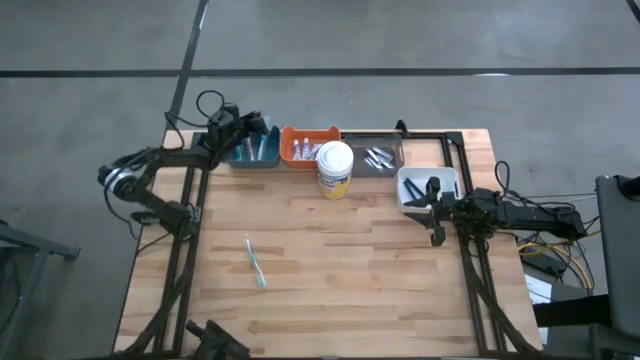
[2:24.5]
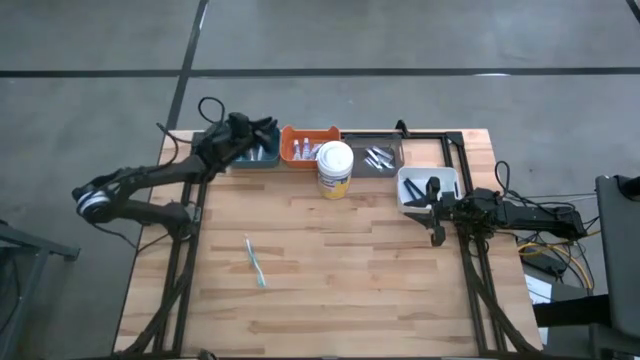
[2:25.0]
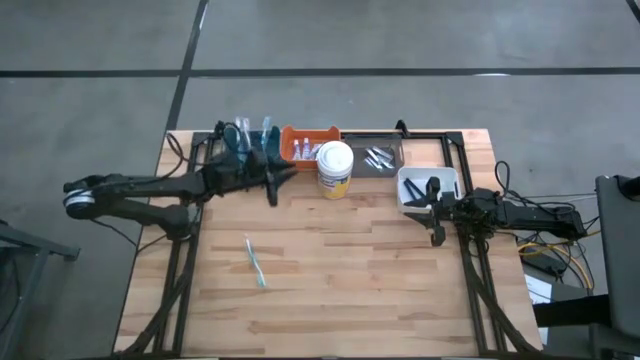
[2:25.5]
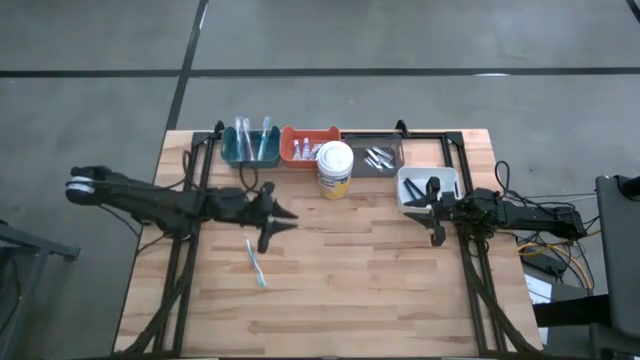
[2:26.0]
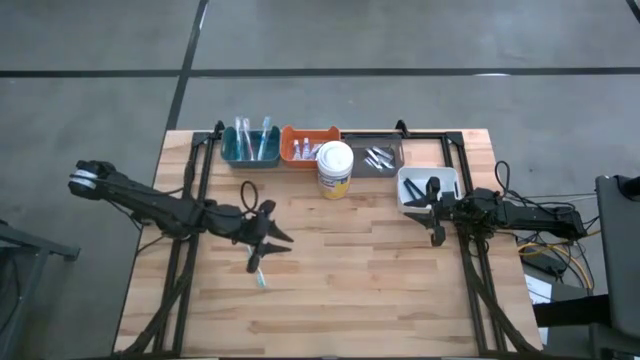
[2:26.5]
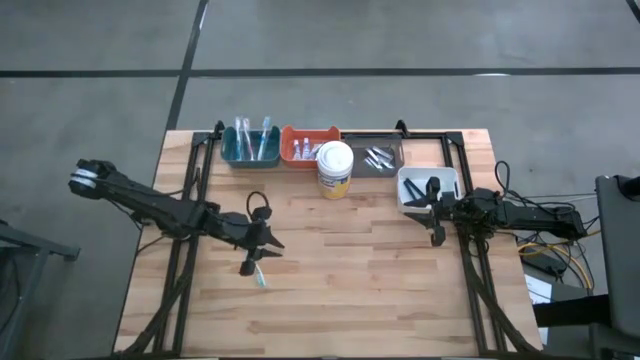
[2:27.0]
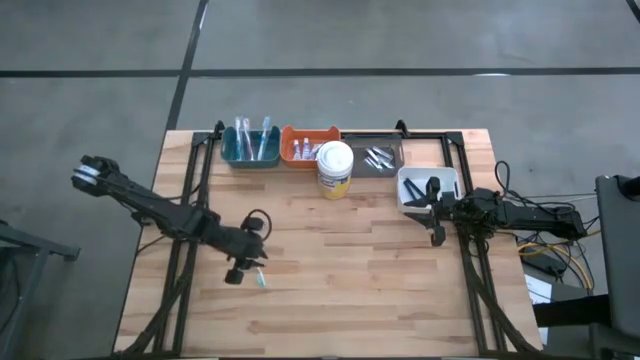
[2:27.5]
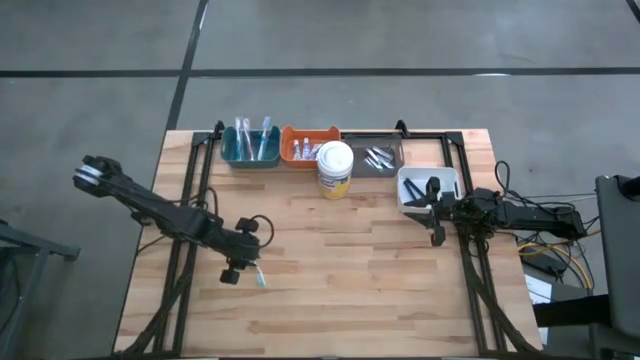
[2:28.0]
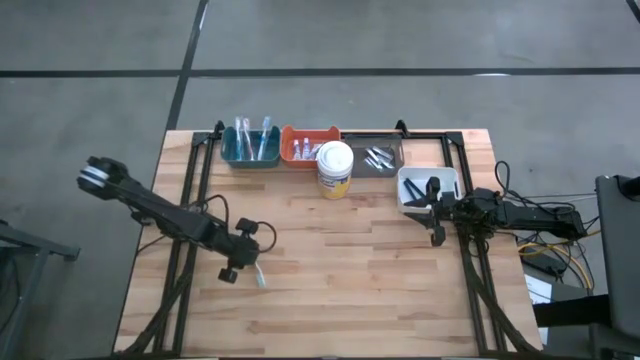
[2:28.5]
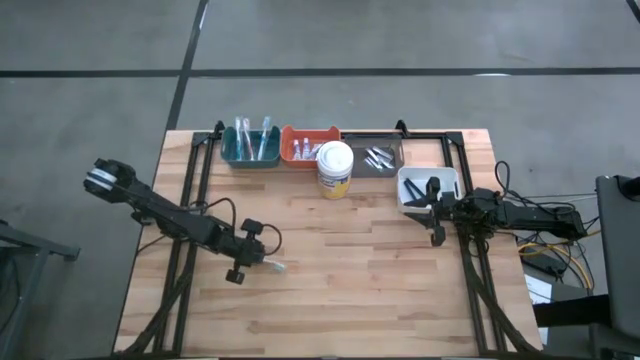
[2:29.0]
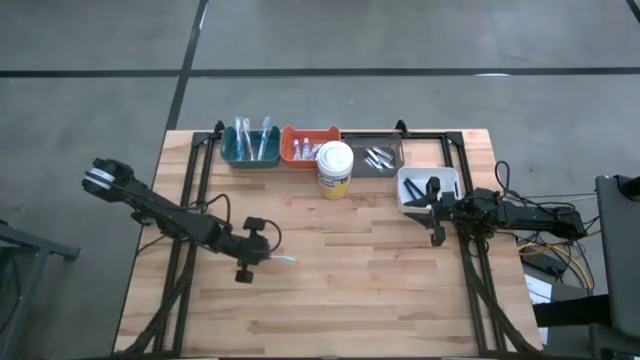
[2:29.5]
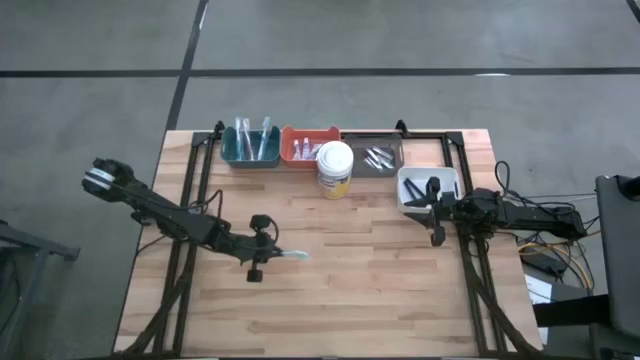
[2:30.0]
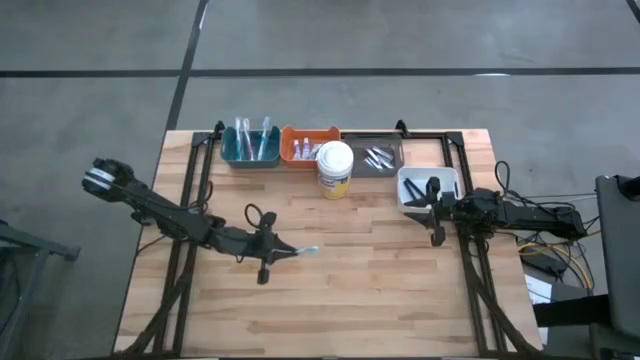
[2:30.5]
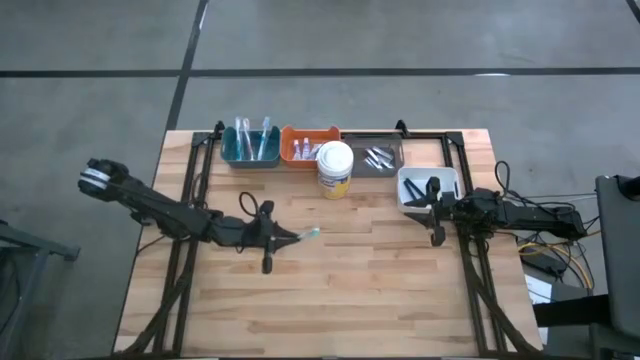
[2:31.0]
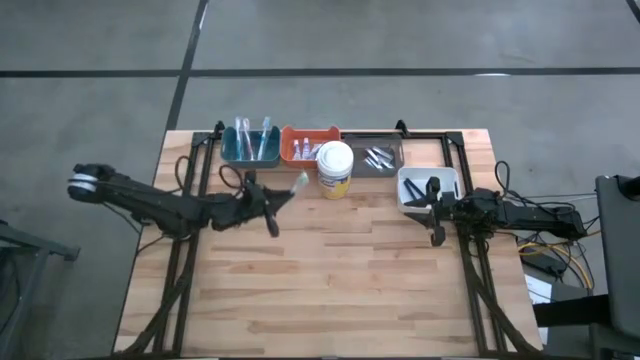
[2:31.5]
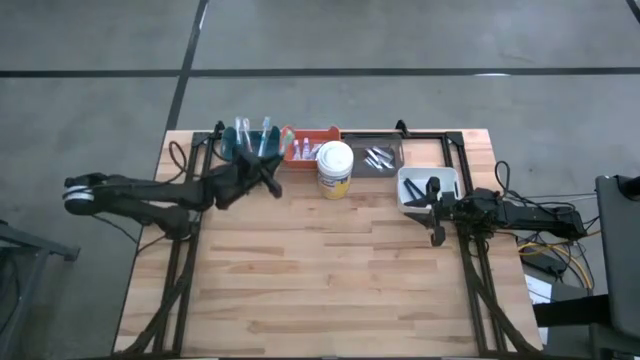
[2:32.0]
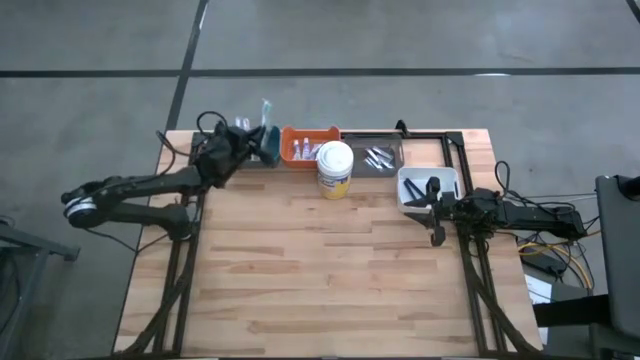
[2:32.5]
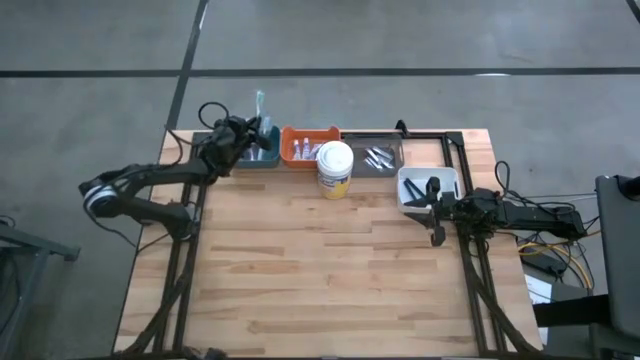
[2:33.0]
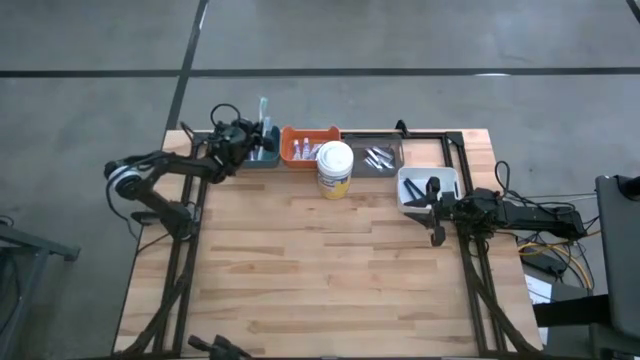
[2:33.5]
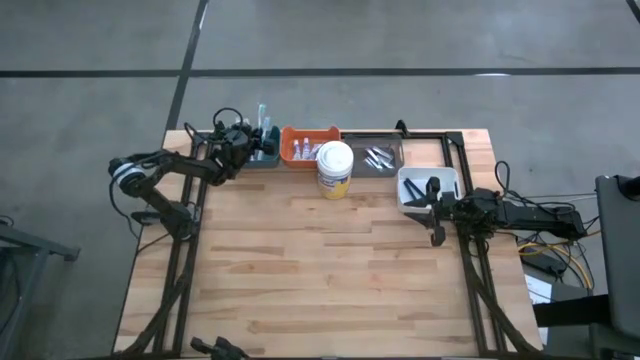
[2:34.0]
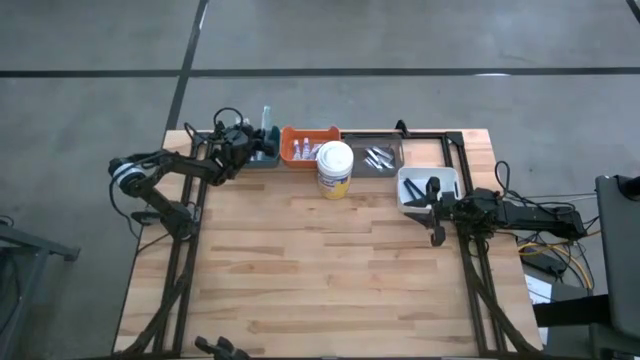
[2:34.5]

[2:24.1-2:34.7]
Task: Pick & Place Travel size toiletries
Put the green toothbrush into the blue bin

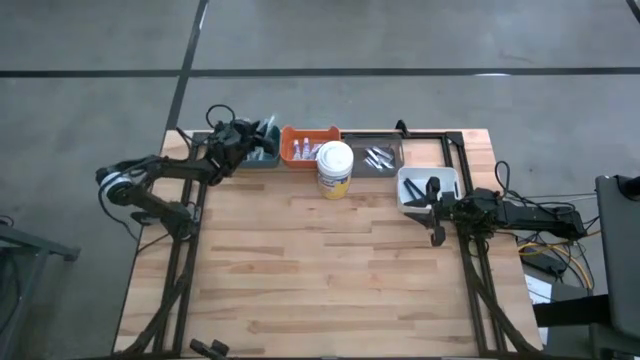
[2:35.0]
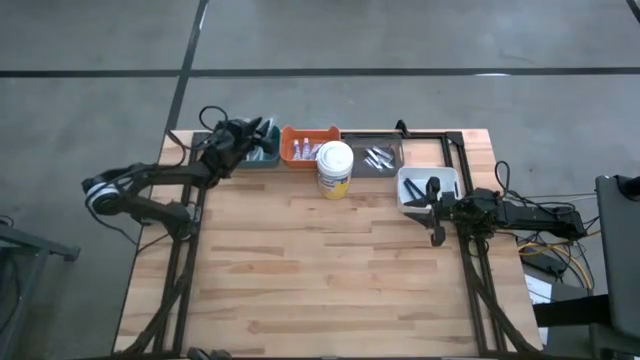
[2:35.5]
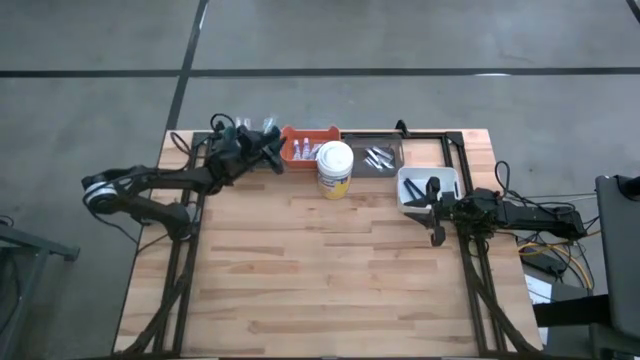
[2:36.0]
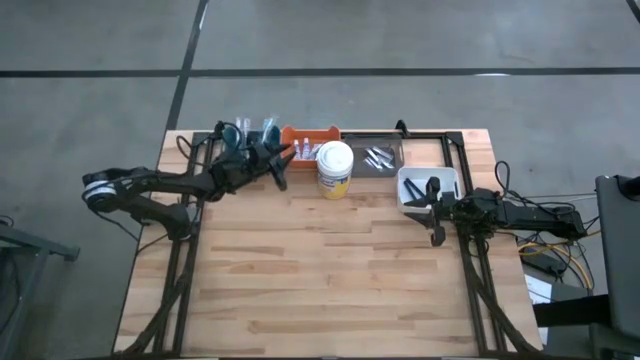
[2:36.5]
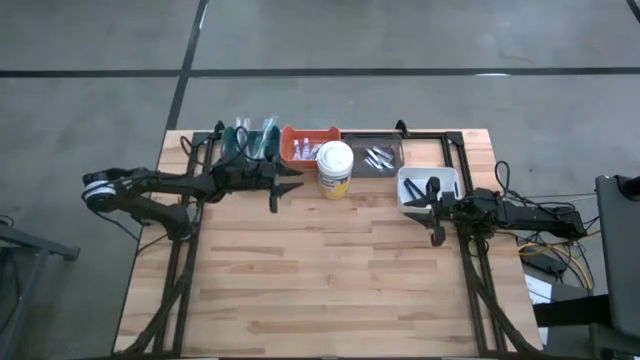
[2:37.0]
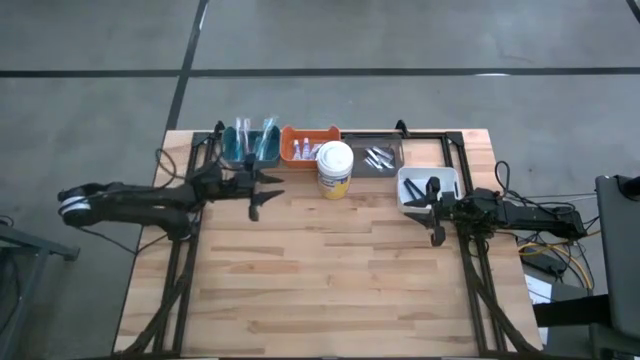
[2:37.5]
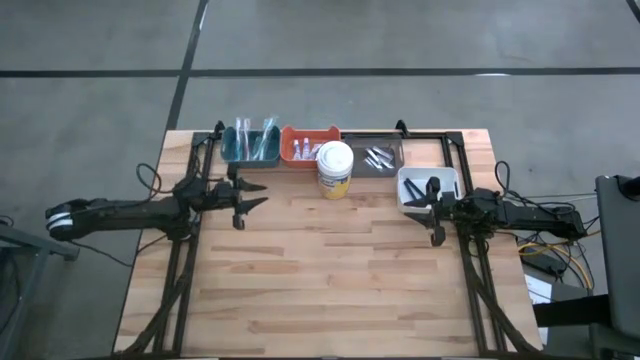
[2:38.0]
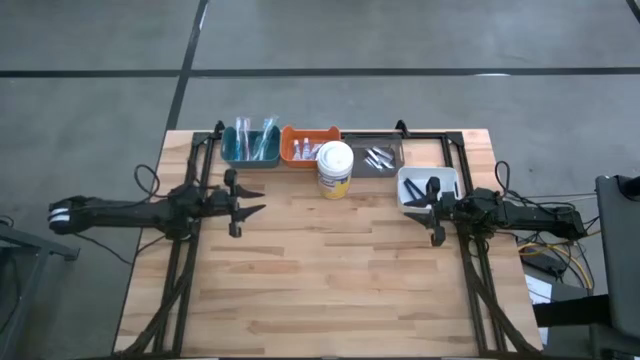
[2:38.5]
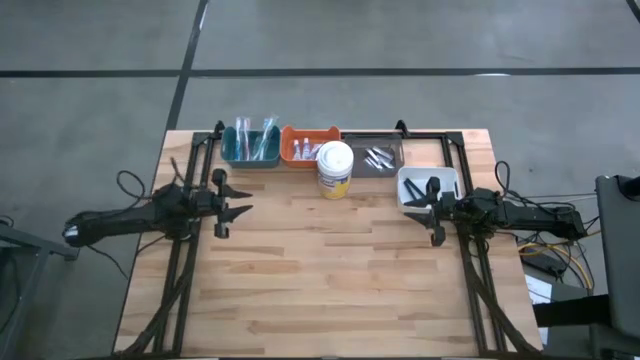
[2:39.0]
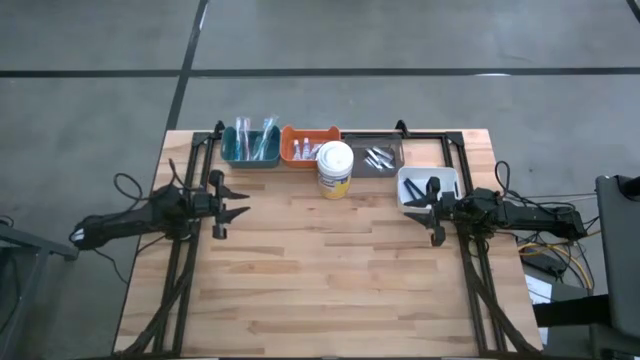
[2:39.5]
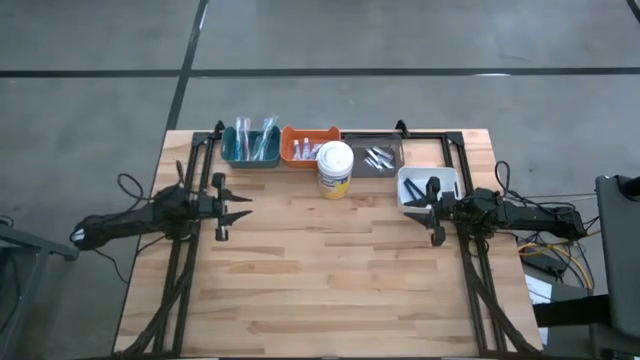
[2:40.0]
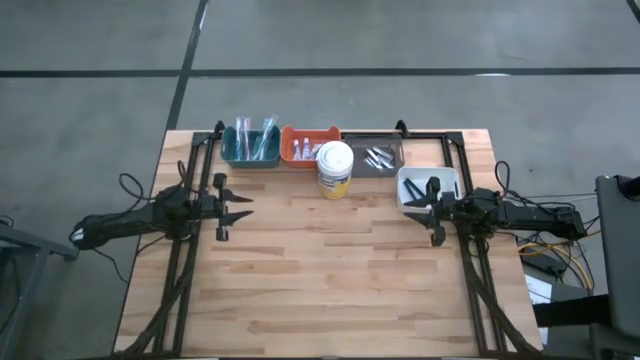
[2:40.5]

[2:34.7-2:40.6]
Return to Home Position

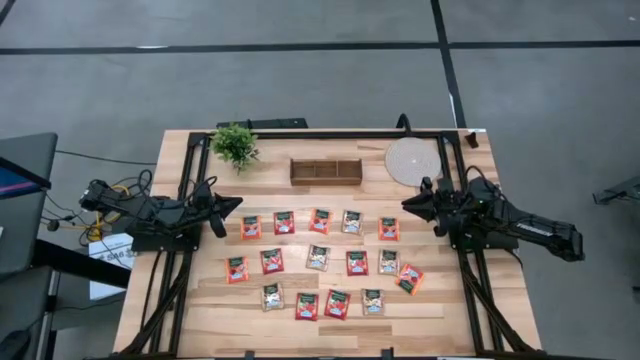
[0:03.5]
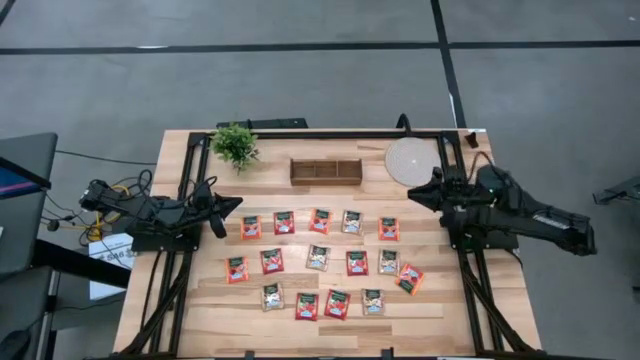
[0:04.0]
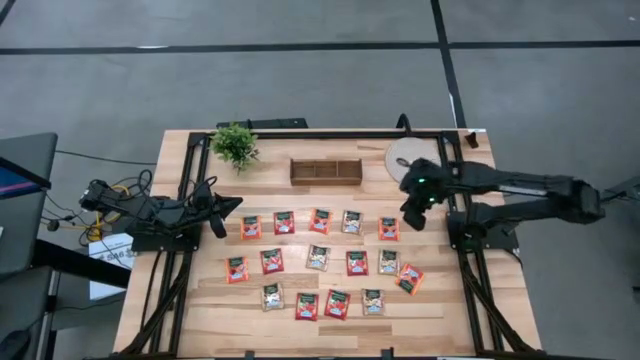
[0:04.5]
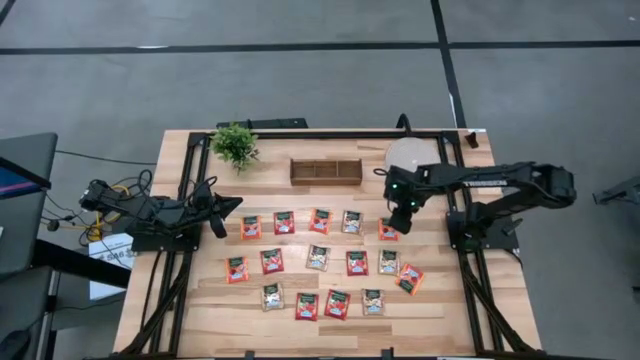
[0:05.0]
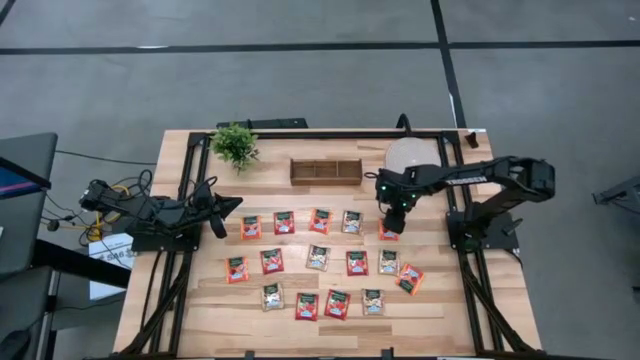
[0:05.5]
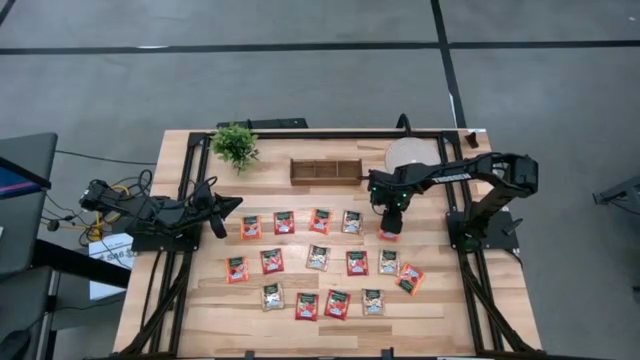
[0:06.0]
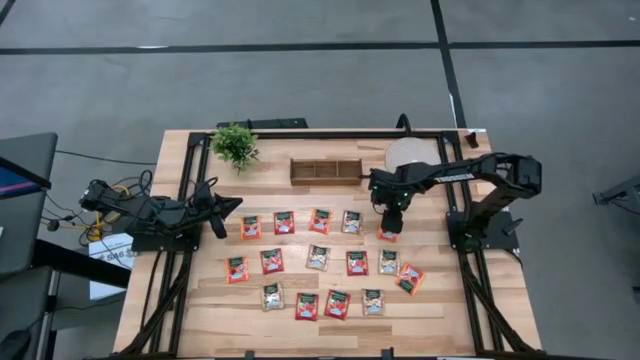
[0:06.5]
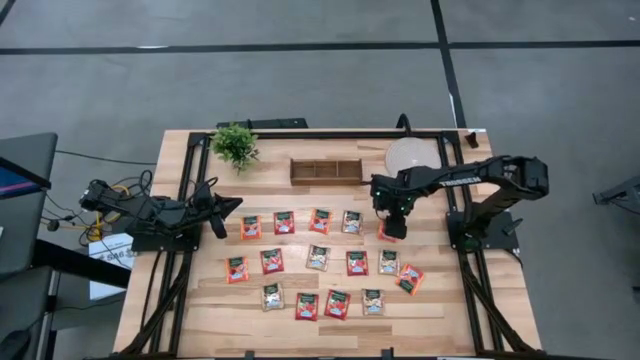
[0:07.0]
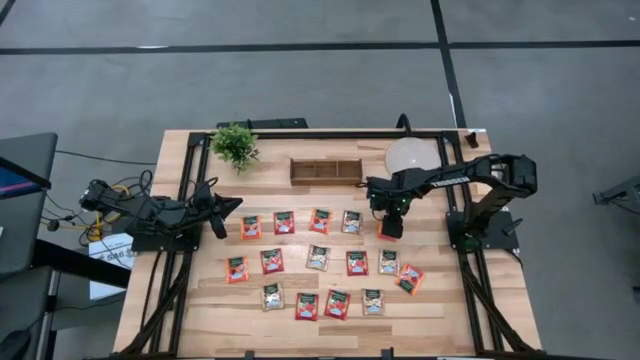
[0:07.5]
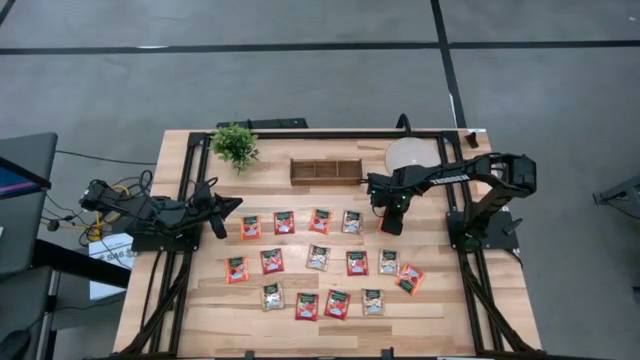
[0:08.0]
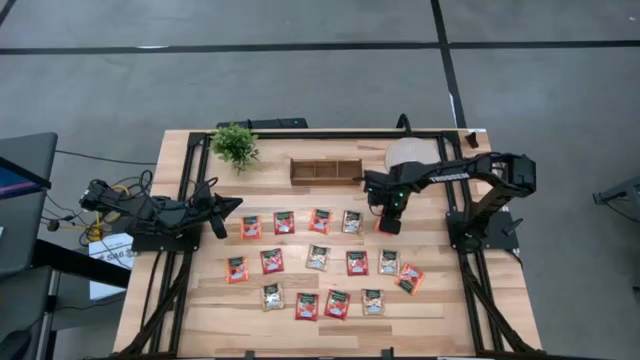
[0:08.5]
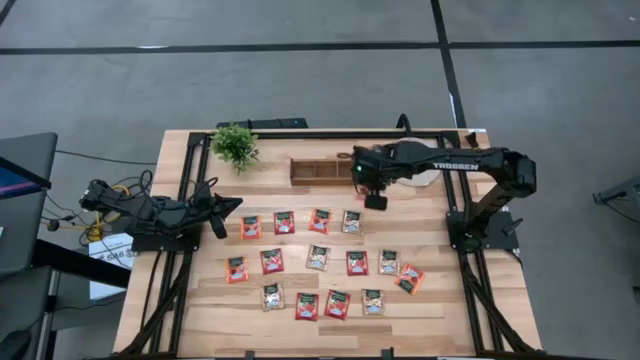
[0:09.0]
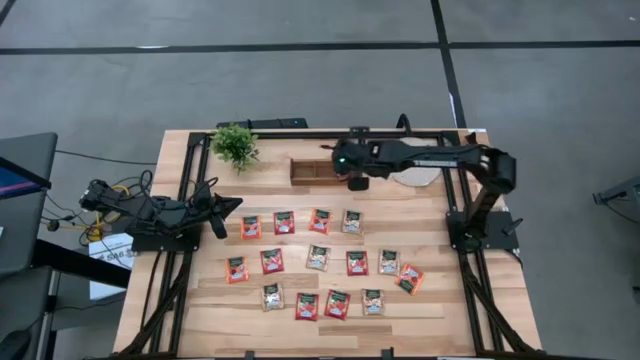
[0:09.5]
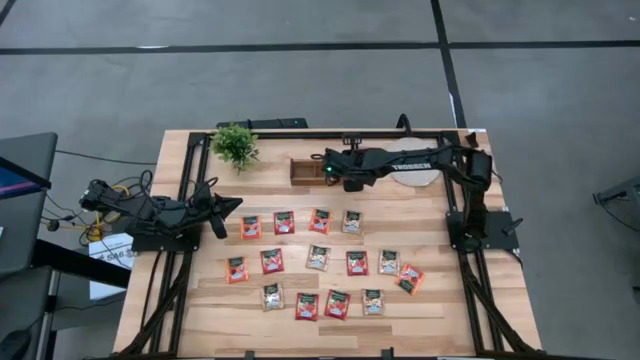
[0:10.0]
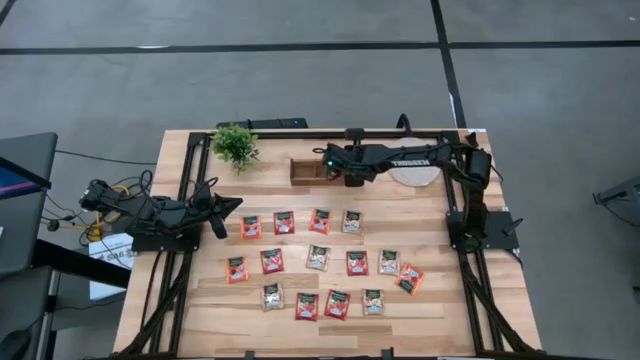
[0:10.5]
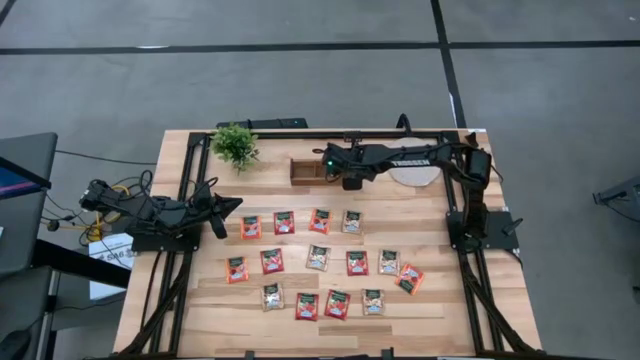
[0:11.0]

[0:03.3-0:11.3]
Task: Pick & Place Tea
Put the orange tea bag into the right section of the wooden organizer
